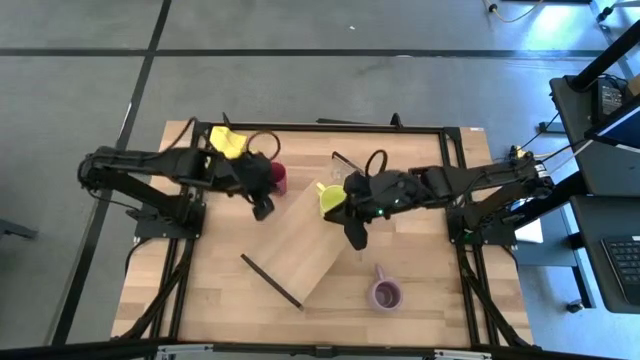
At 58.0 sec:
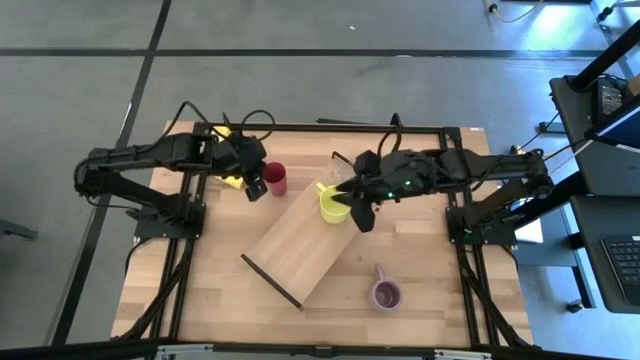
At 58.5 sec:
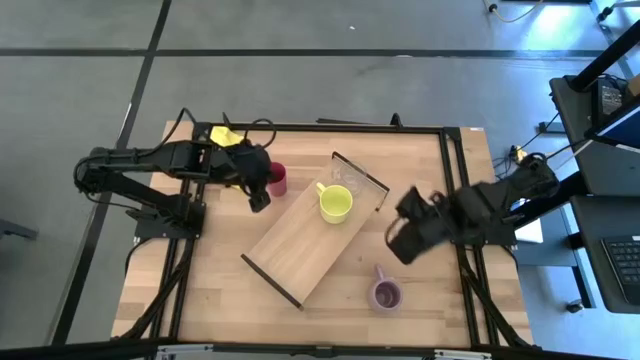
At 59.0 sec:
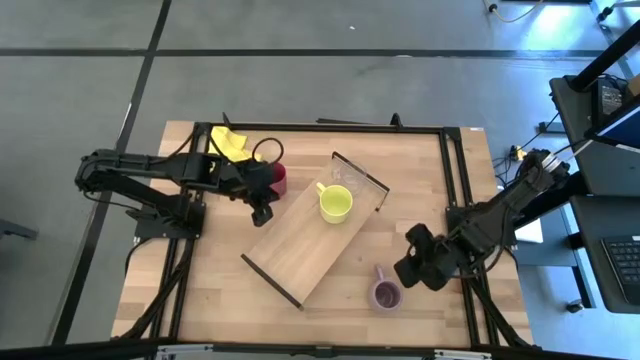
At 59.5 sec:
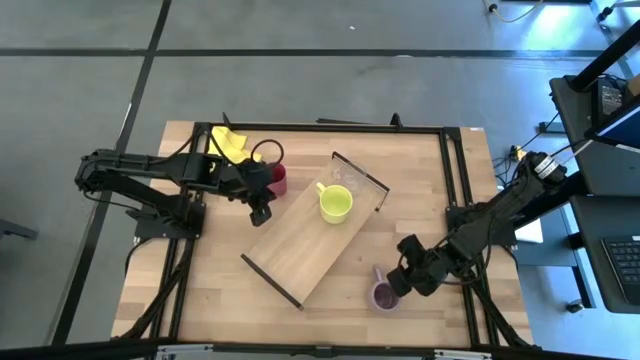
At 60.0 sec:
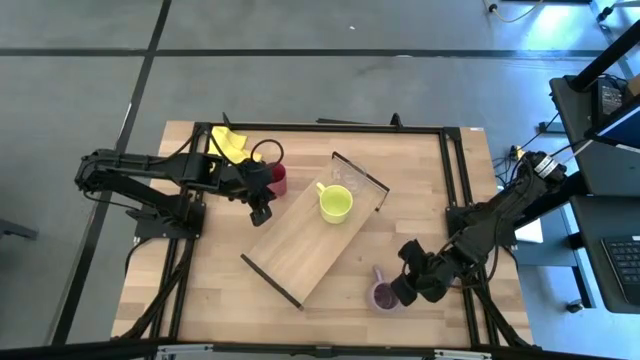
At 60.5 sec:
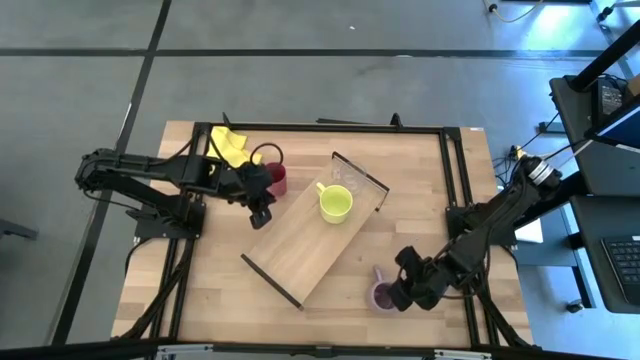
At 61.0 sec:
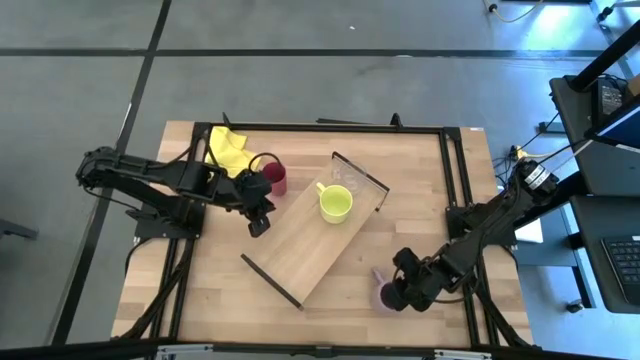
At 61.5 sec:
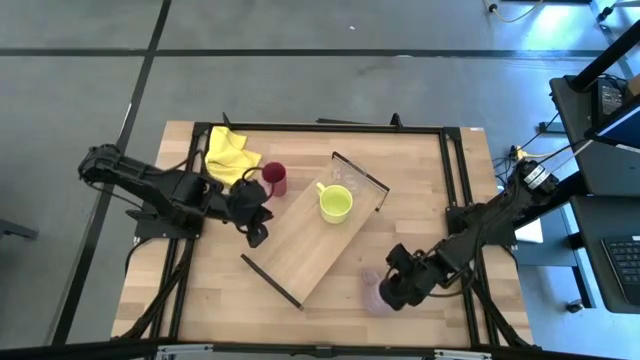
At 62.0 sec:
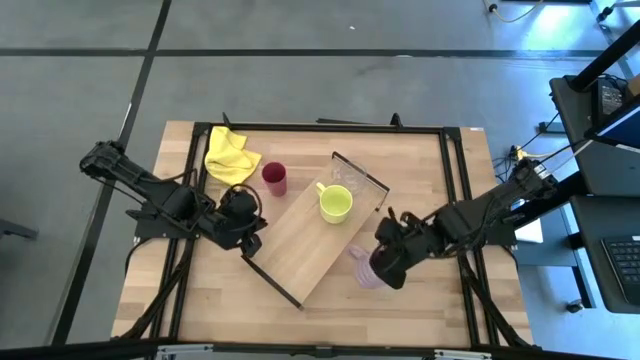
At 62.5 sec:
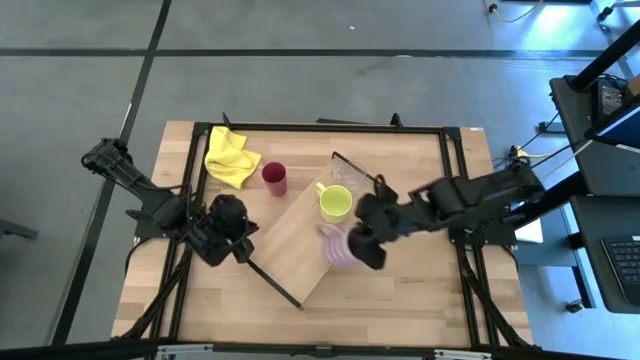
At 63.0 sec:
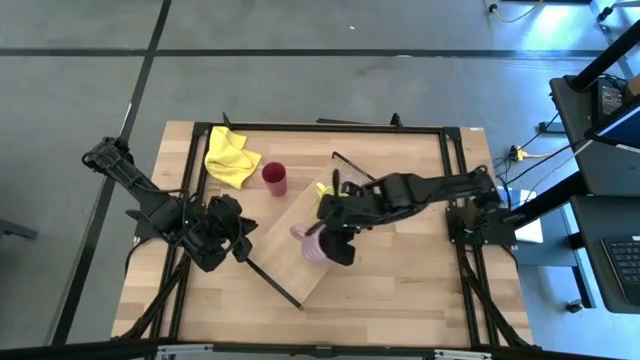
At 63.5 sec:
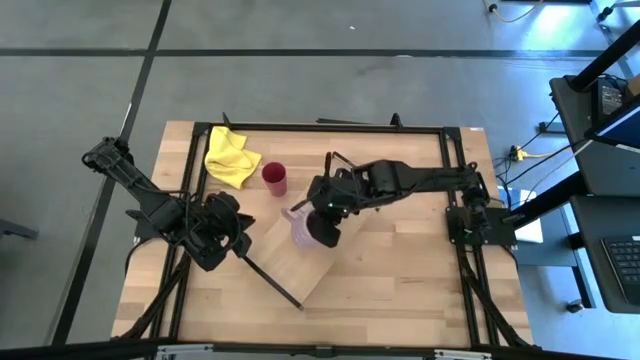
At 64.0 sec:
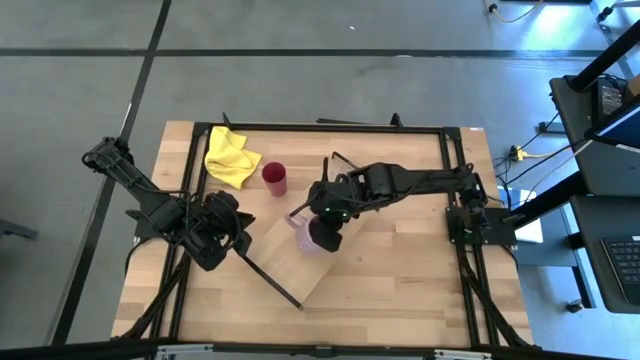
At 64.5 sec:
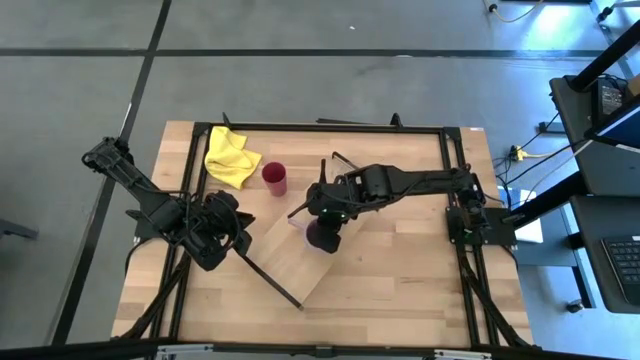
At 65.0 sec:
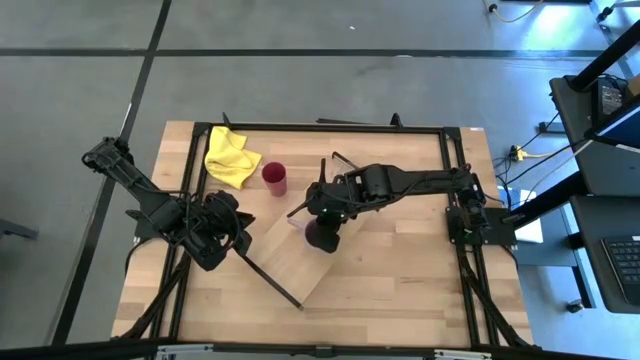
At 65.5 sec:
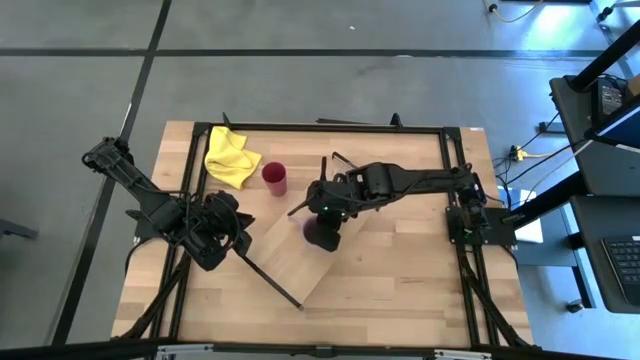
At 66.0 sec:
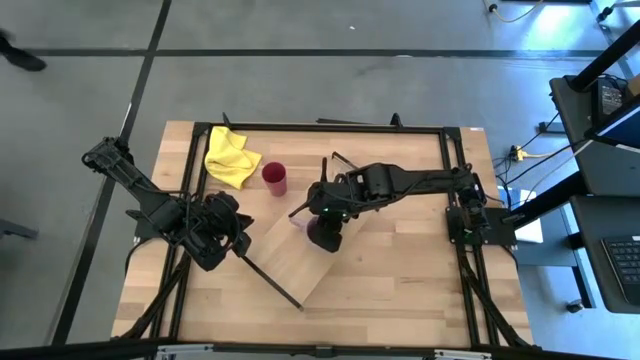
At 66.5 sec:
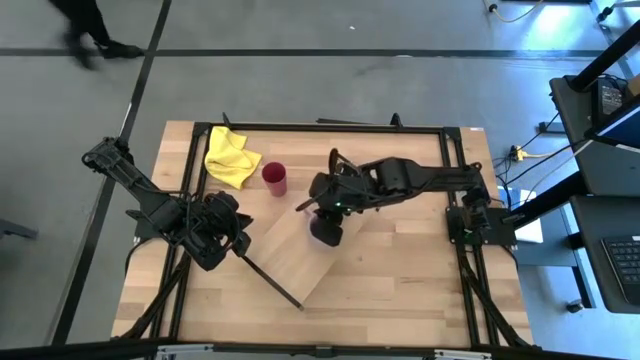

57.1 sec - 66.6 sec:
Task: Stack small to large cups/mugs on shelf
Put the purple mug on the shelf

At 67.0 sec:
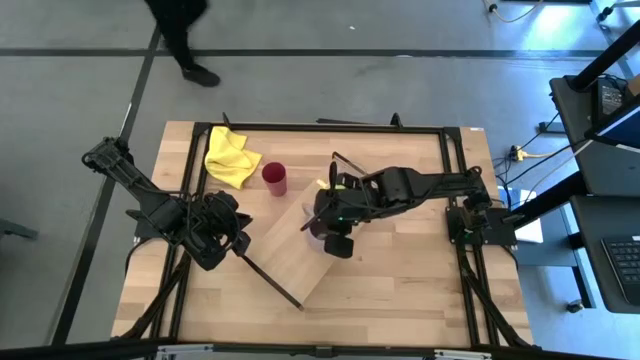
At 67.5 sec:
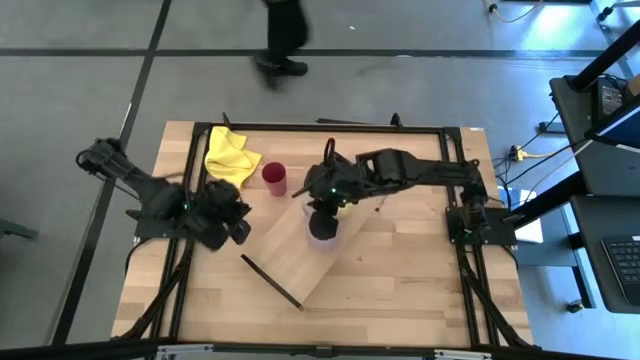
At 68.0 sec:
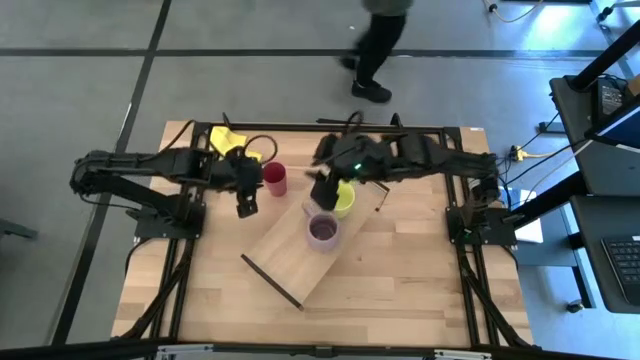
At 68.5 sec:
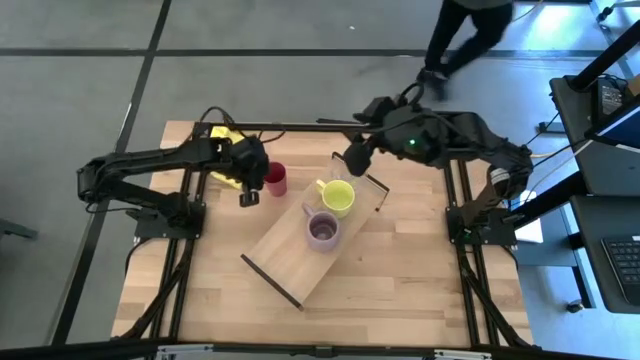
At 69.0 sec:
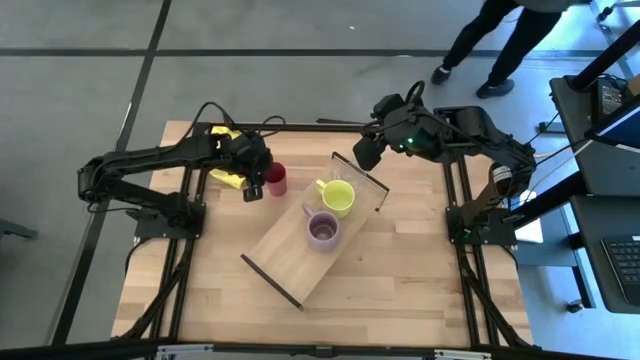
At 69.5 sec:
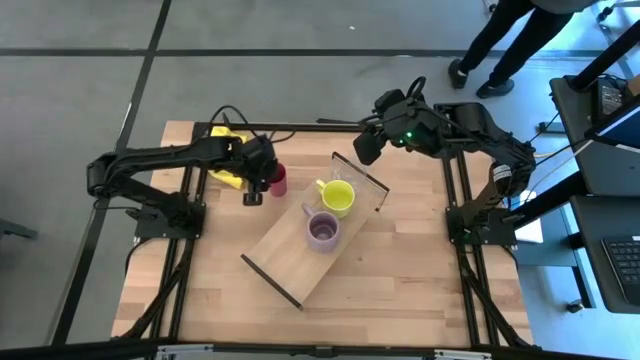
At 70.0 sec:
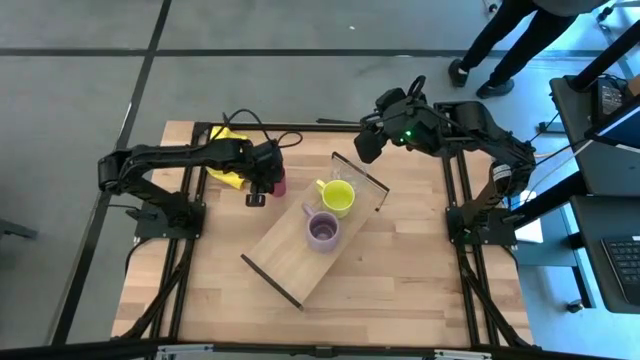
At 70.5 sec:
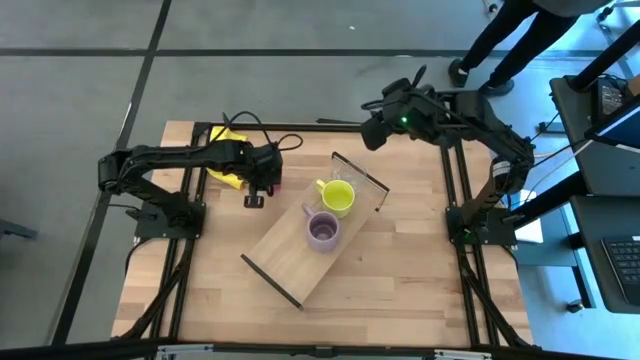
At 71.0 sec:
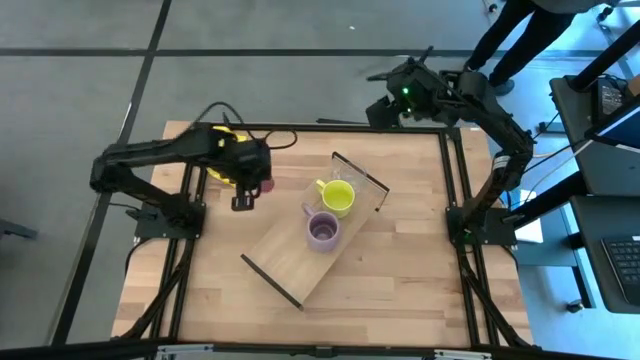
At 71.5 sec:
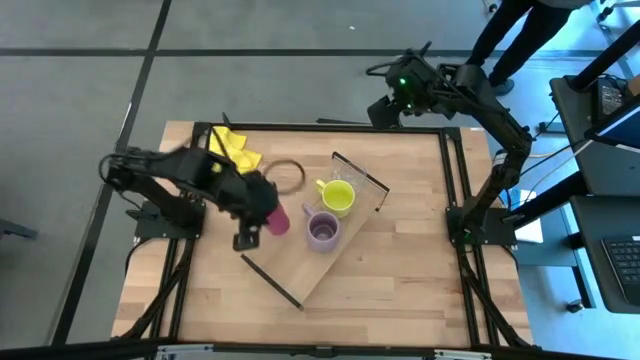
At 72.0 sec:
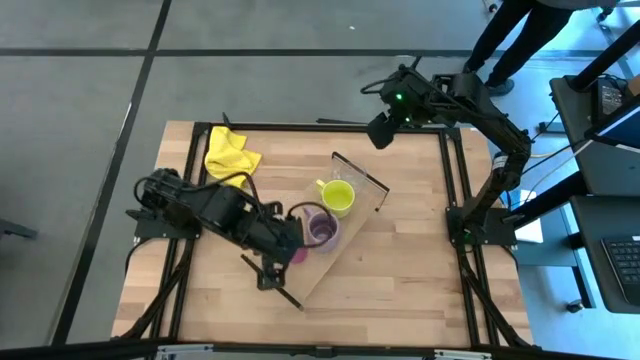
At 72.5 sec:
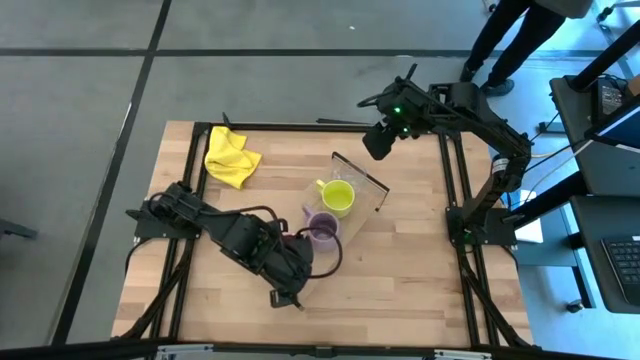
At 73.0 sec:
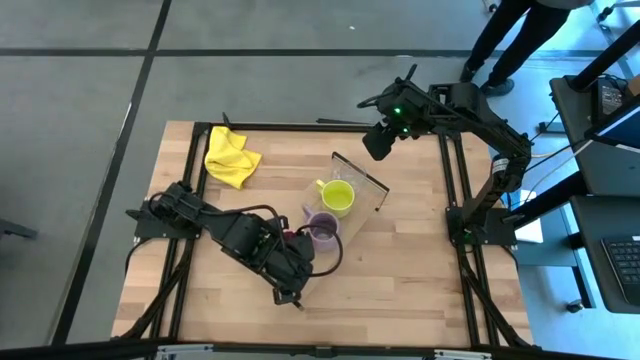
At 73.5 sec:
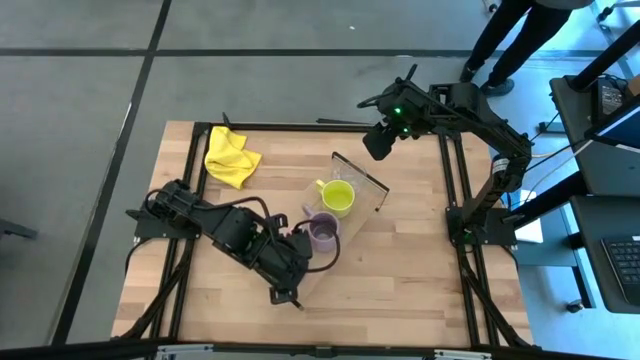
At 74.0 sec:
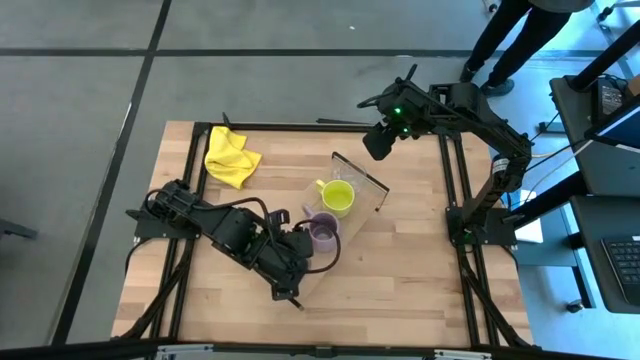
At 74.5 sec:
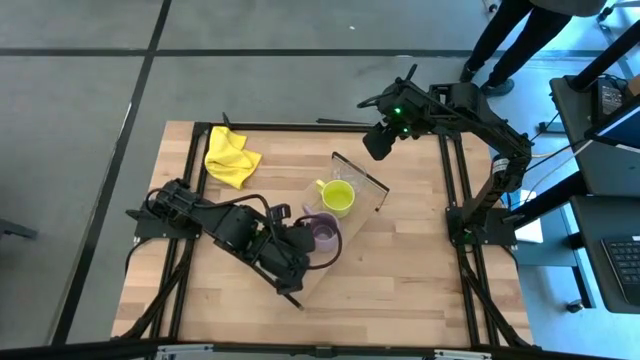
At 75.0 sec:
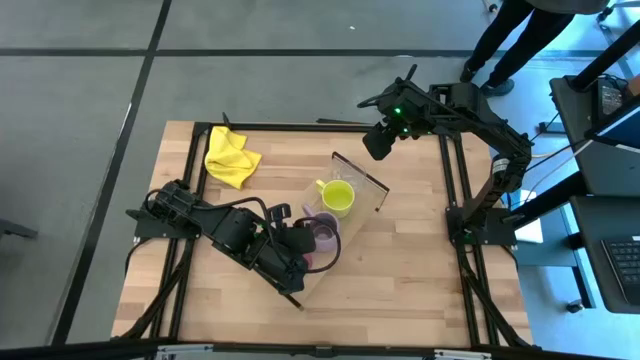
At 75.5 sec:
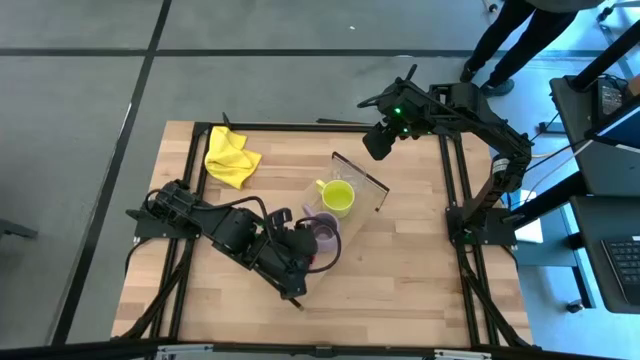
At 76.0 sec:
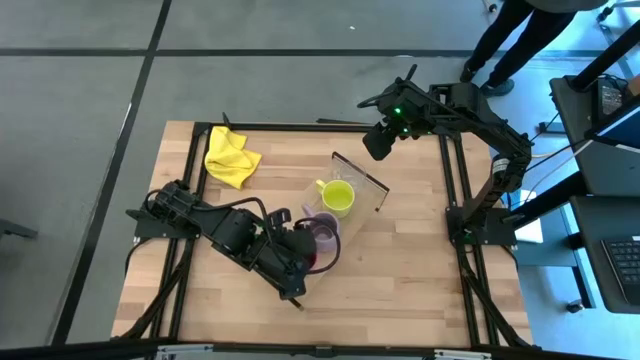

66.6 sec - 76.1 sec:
Put the red cup on the shelf

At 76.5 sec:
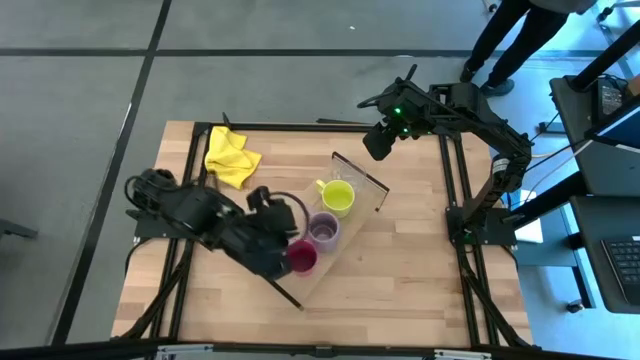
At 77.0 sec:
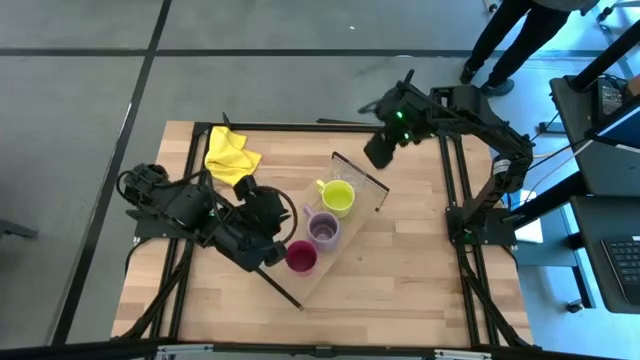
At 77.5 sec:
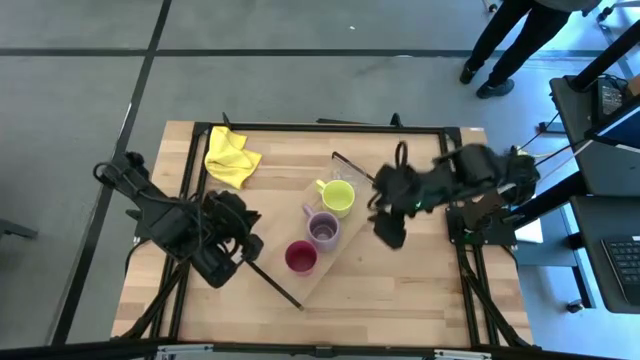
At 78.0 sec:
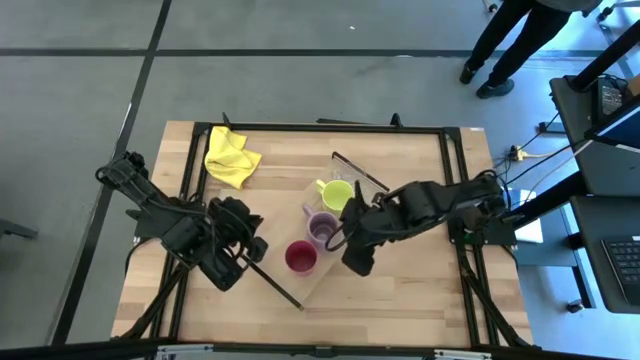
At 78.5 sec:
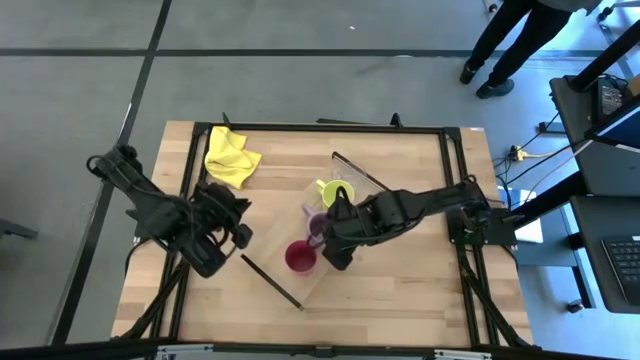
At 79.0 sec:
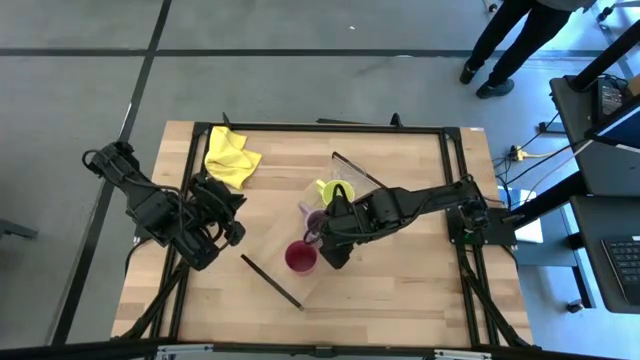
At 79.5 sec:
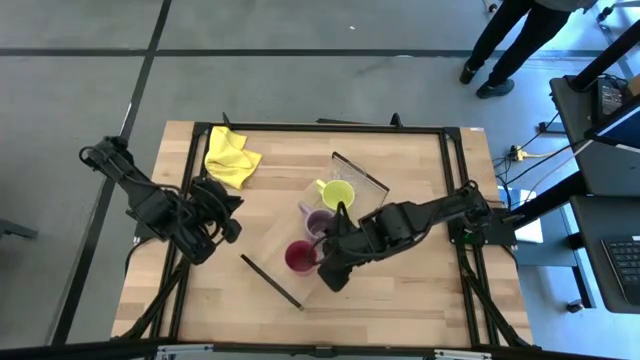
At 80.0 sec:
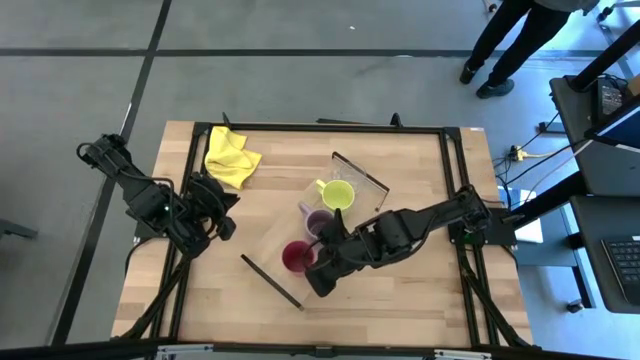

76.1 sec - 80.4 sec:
Adjust the purple mug and cup on the shelf
